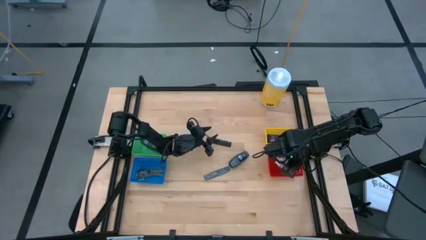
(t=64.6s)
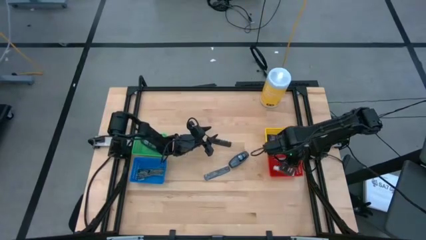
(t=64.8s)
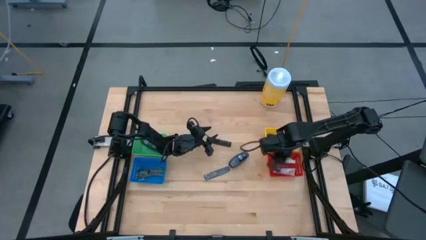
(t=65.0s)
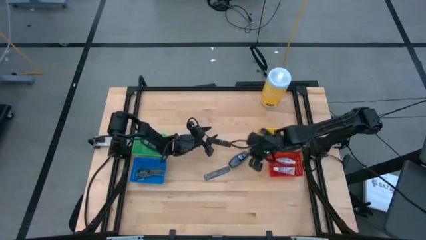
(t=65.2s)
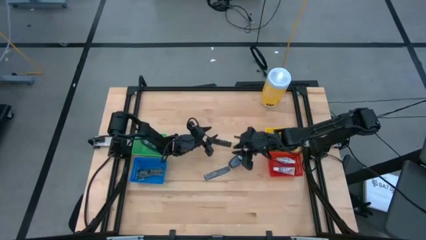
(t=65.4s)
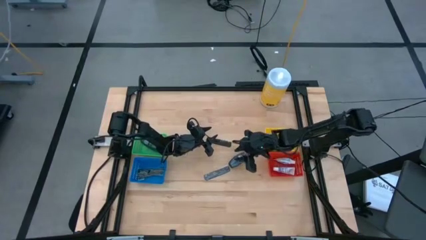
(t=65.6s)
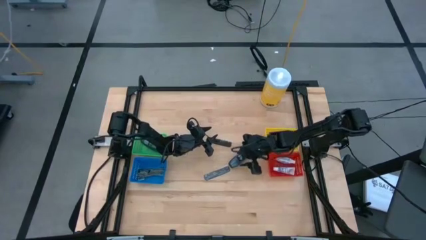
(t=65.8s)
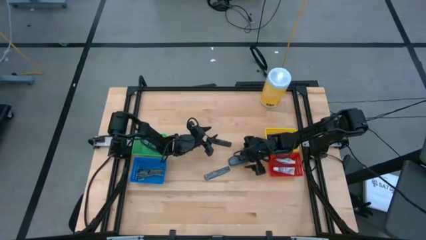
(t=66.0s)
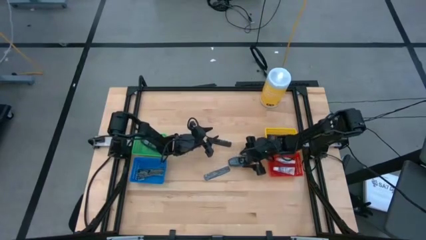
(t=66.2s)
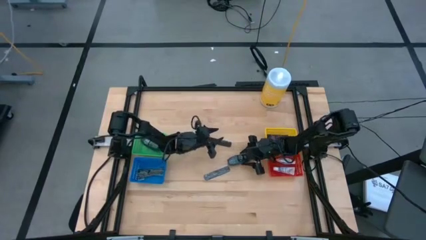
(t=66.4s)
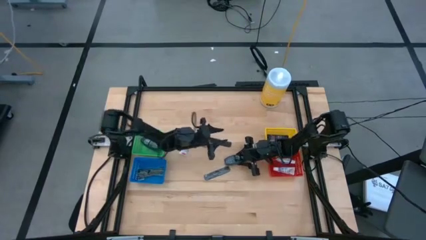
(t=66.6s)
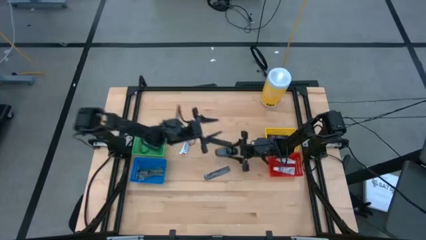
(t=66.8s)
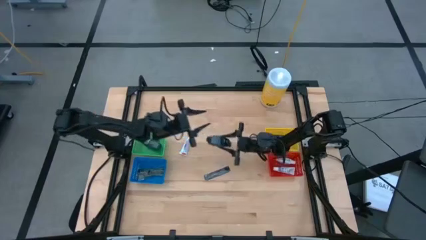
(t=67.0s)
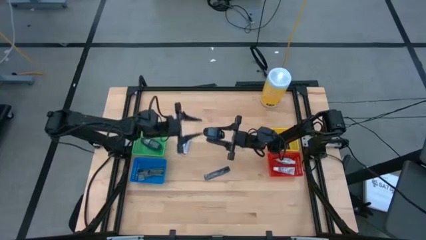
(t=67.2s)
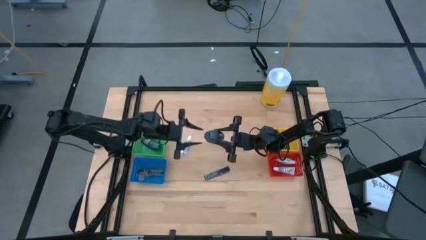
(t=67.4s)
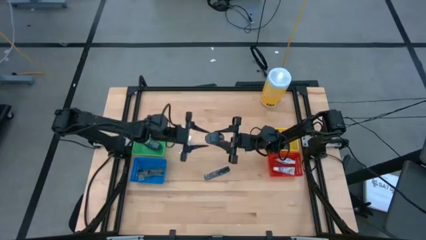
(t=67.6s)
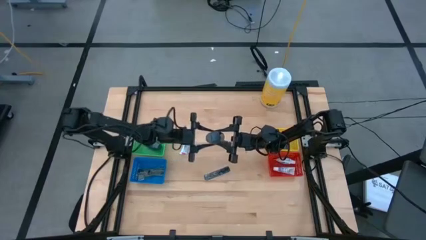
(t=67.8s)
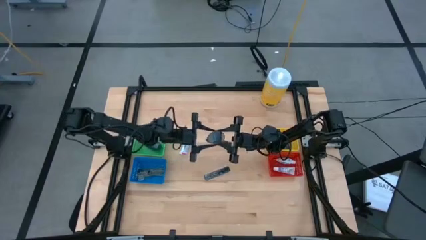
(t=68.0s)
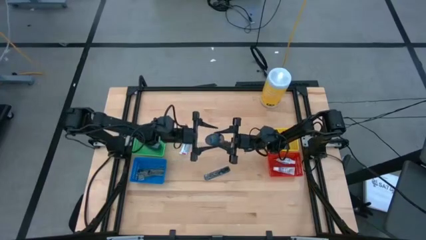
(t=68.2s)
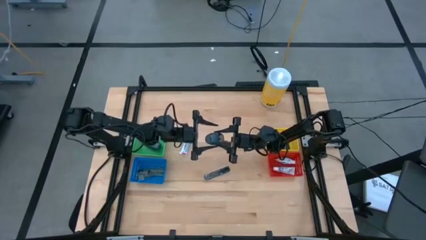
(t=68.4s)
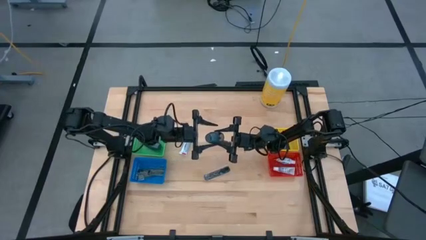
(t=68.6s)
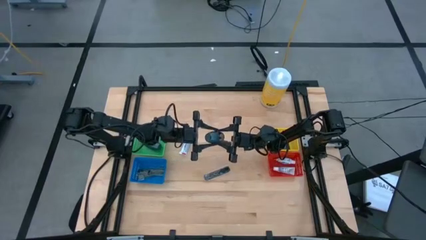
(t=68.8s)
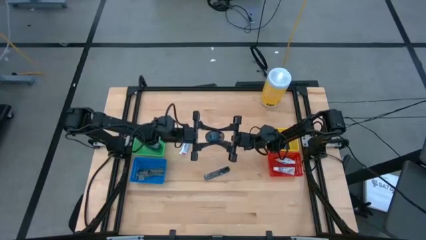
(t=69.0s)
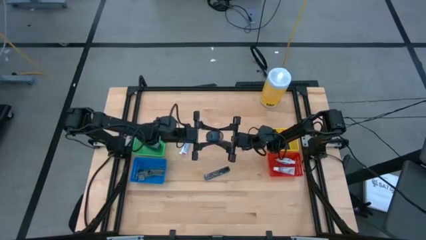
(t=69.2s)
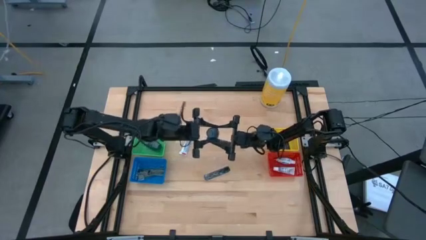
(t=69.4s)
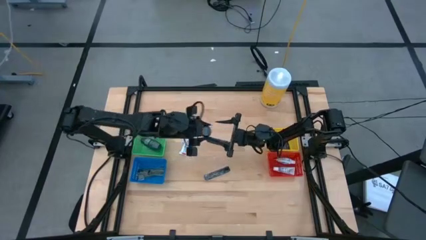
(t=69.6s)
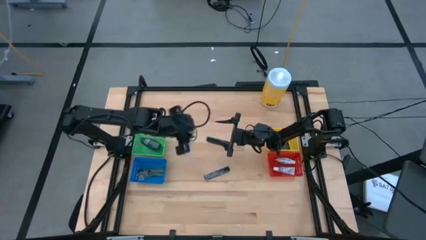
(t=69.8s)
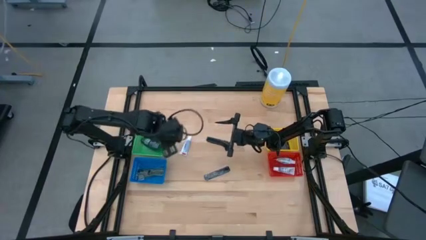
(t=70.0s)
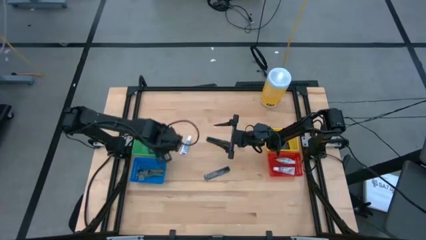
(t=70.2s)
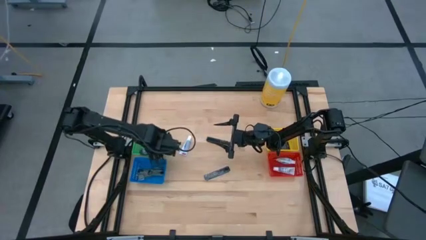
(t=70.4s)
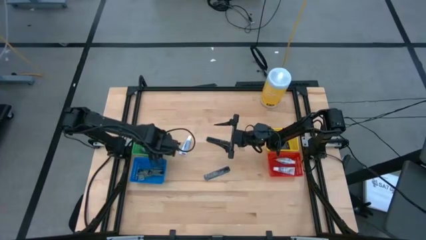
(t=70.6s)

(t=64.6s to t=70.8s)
Task: Pick & Place Travel size toiletries
Put the black deodorant into the green bin

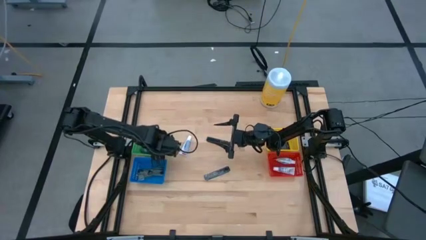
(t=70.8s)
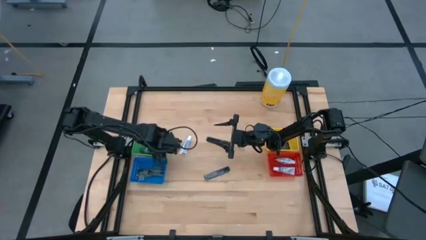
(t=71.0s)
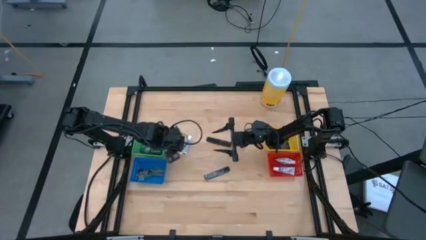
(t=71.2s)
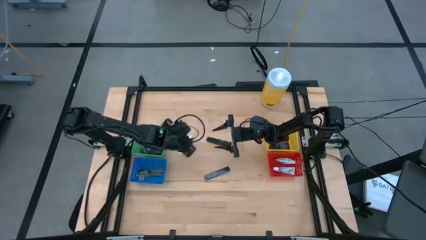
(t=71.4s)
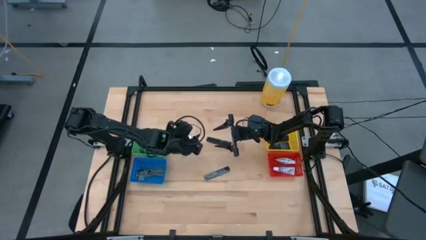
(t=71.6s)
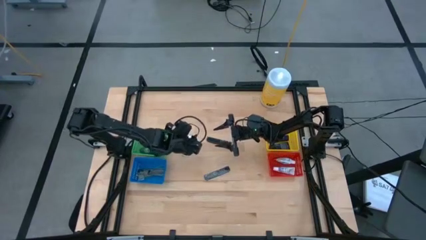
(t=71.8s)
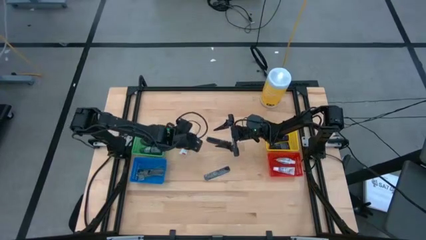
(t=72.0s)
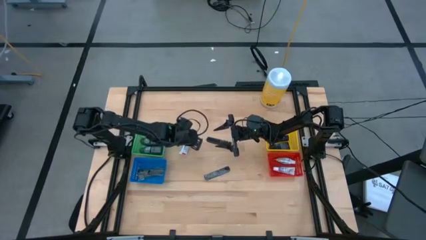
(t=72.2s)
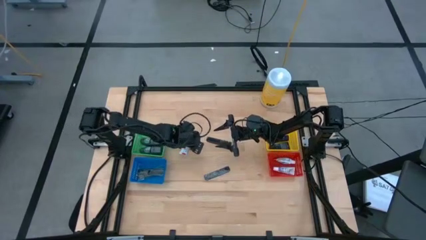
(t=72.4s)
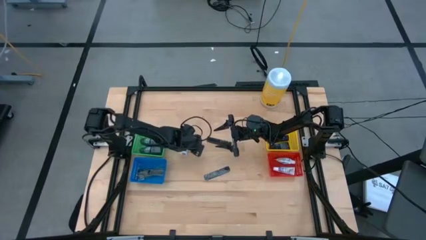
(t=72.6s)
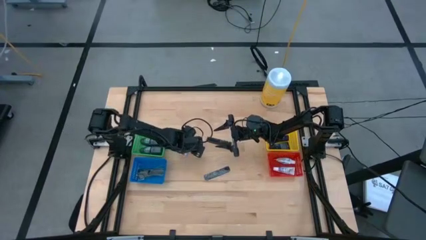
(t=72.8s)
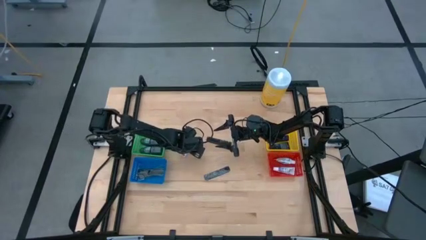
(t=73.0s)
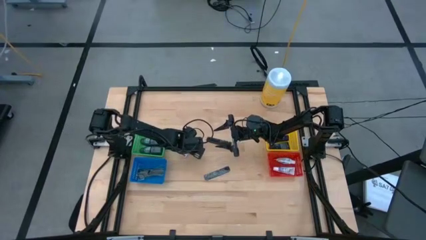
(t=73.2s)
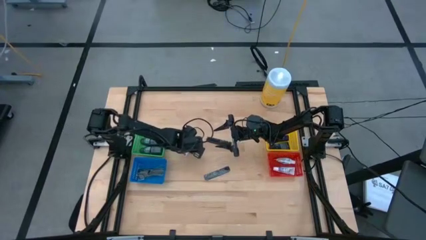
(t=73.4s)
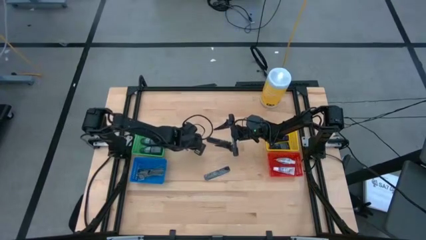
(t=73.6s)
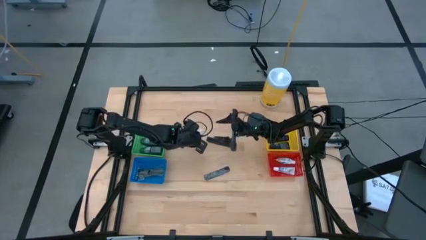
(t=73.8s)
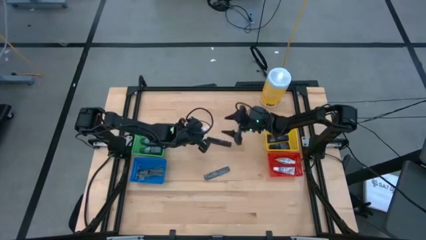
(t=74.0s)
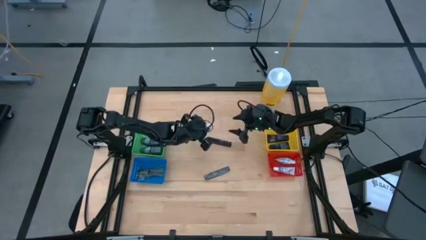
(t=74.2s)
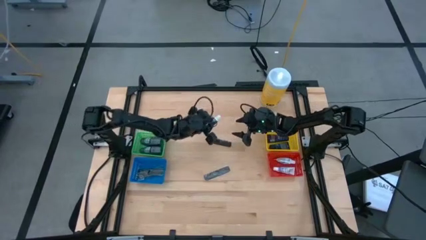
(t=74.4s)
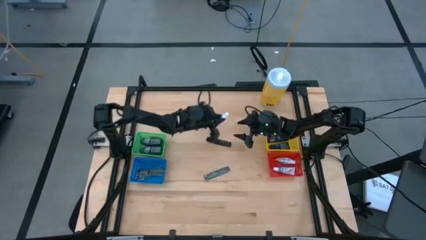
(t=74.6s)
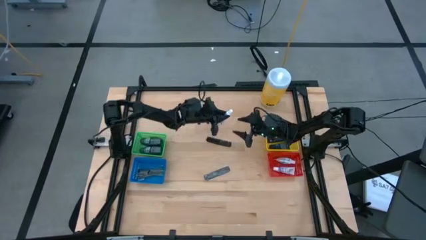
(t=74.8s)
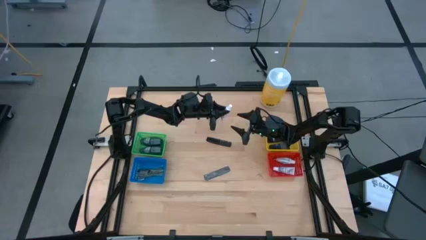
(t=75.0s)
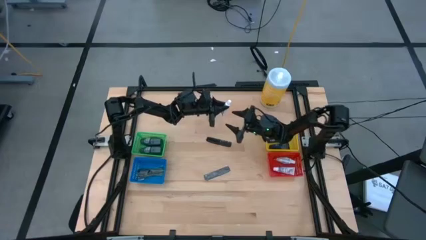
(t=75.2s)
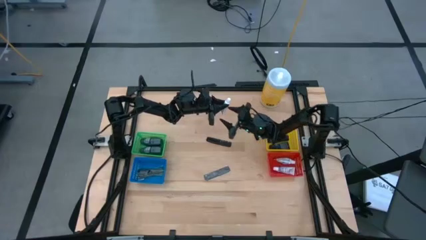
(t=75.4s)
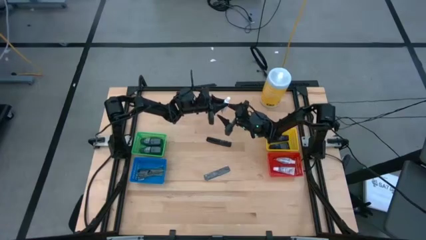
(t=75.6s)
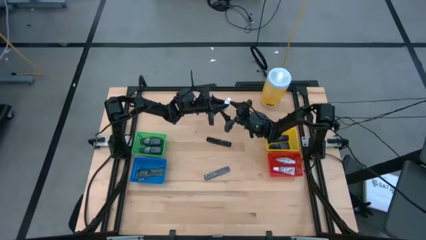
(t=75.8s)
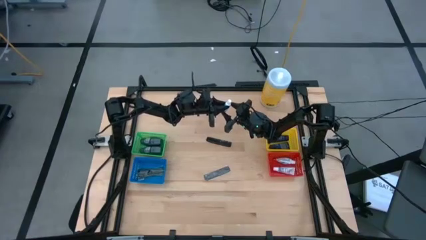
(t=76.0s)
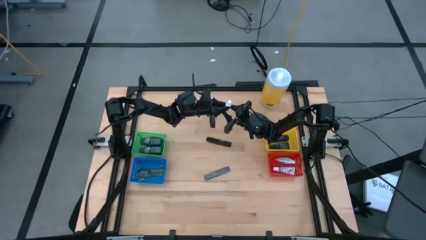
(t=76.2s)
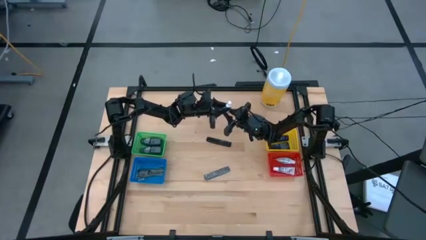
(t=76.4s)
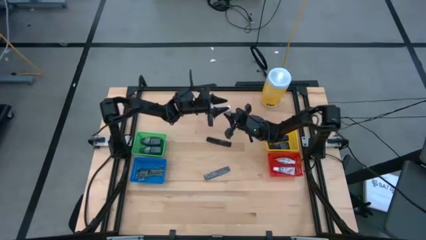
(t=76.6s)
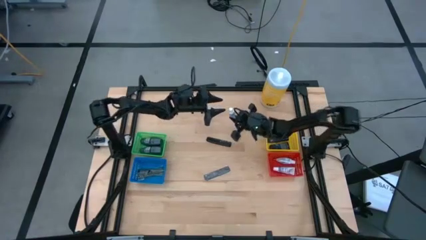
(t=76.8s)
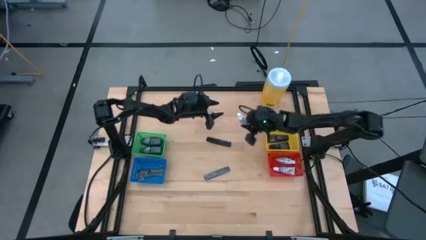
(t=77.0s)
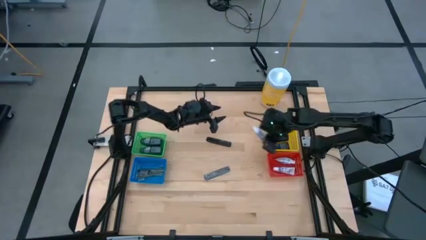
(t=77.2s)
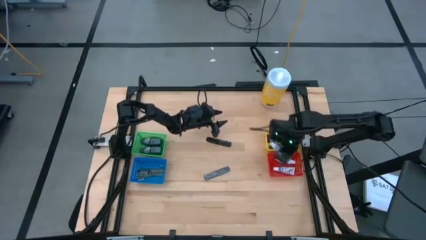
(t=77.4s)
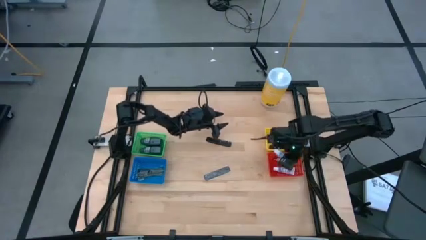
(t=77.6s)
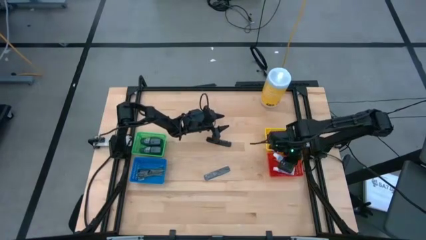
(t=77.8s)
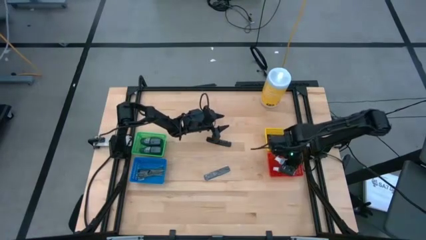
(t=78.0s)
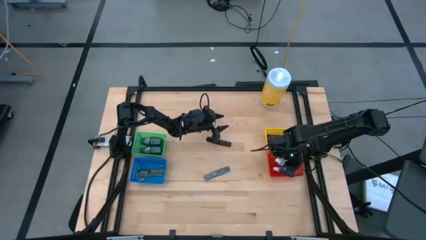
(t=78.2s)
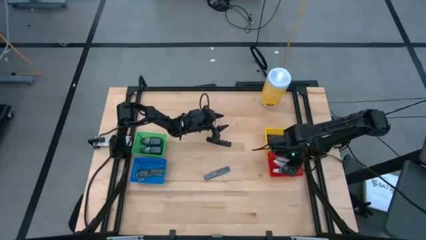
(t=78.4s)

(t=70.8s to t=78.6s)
Put the white toothpaste into the red bin
